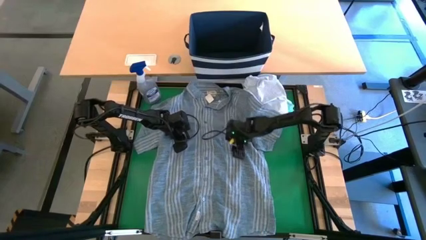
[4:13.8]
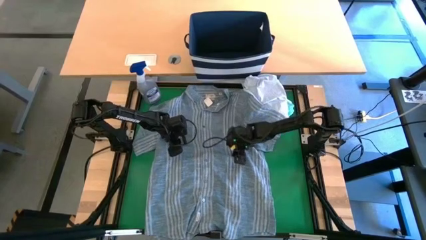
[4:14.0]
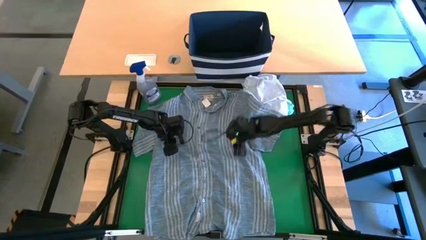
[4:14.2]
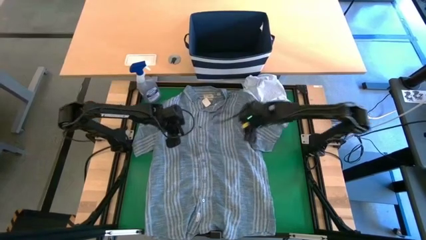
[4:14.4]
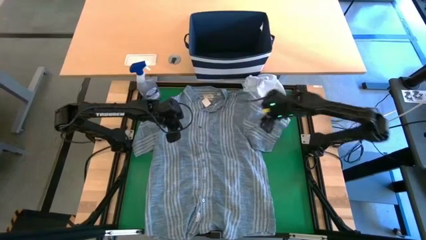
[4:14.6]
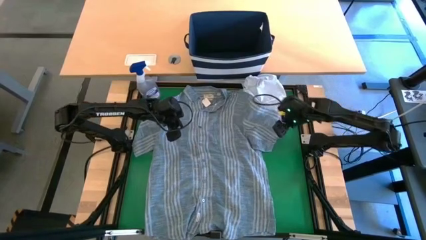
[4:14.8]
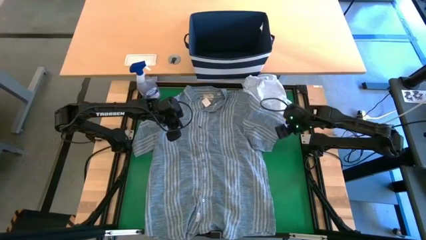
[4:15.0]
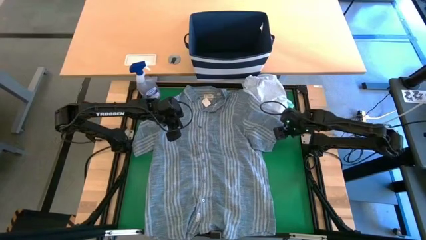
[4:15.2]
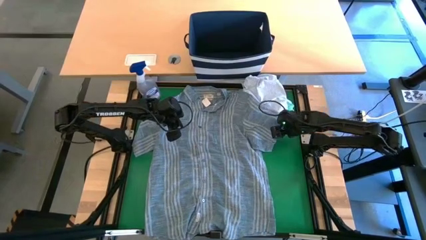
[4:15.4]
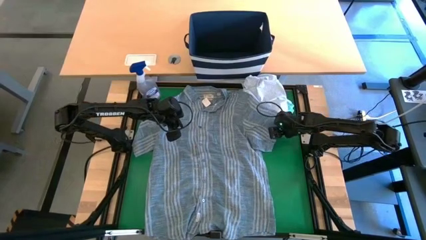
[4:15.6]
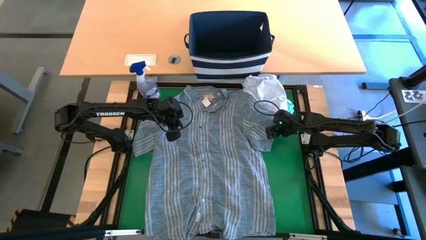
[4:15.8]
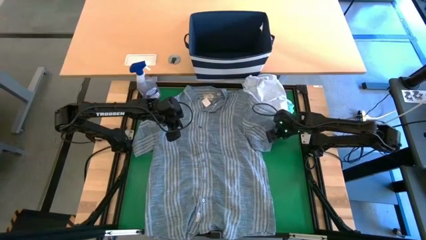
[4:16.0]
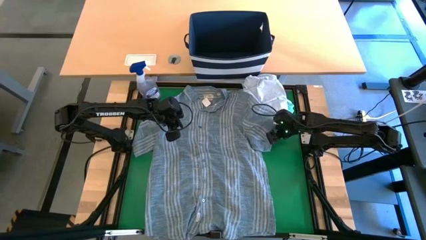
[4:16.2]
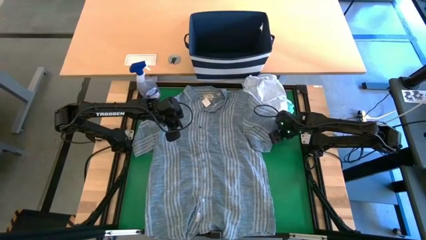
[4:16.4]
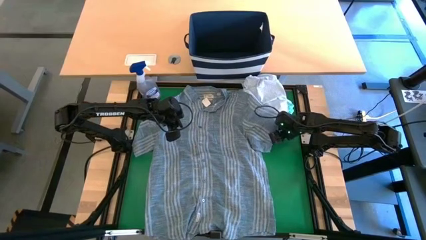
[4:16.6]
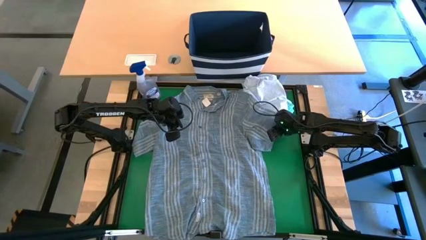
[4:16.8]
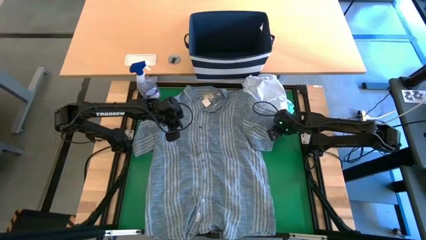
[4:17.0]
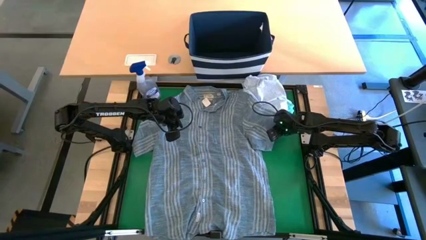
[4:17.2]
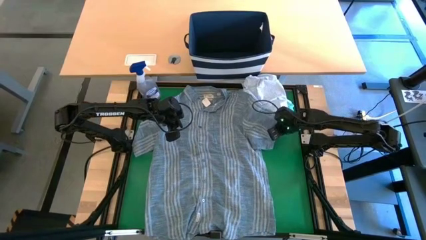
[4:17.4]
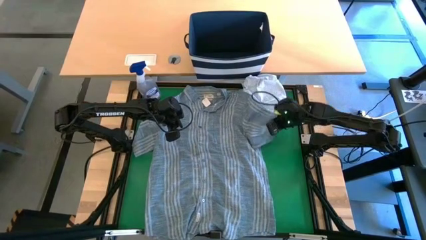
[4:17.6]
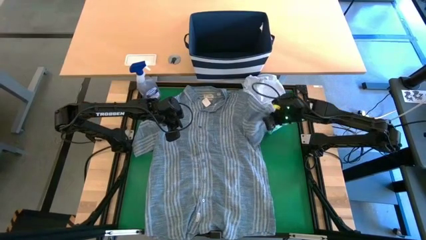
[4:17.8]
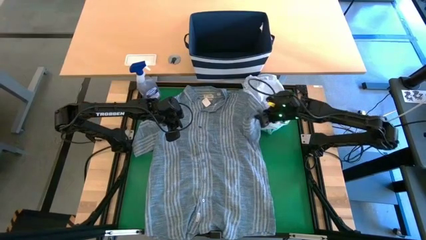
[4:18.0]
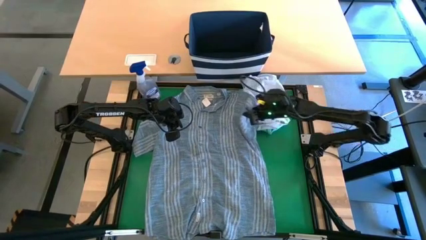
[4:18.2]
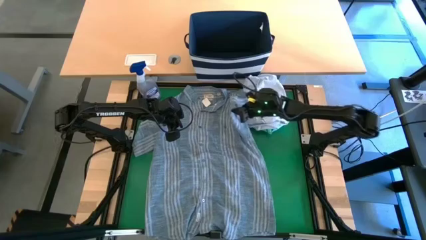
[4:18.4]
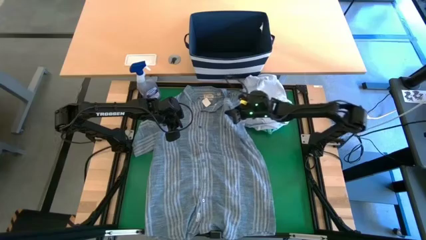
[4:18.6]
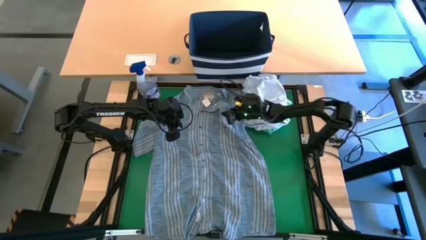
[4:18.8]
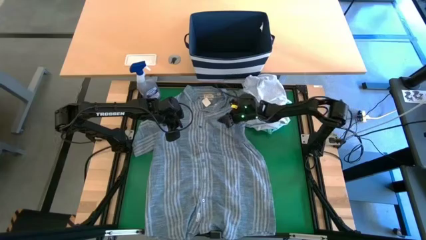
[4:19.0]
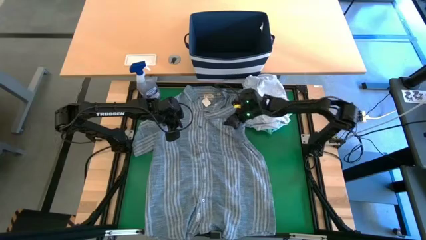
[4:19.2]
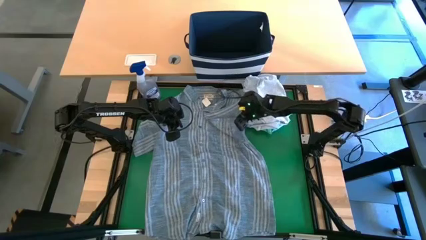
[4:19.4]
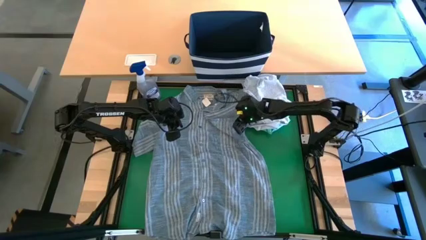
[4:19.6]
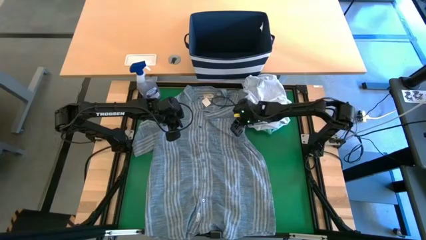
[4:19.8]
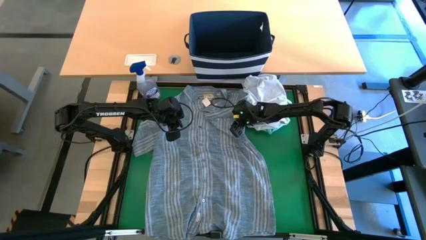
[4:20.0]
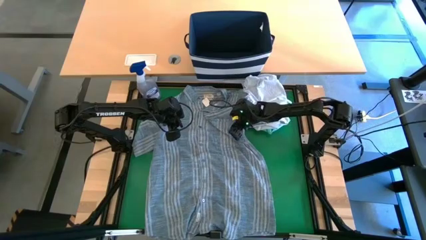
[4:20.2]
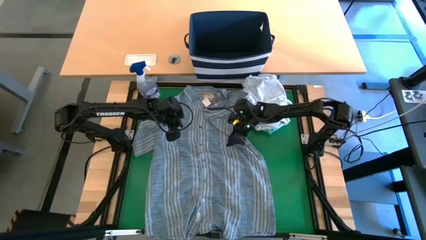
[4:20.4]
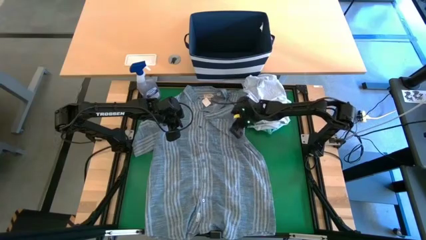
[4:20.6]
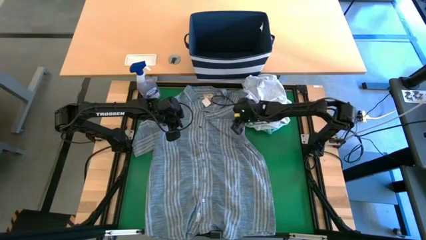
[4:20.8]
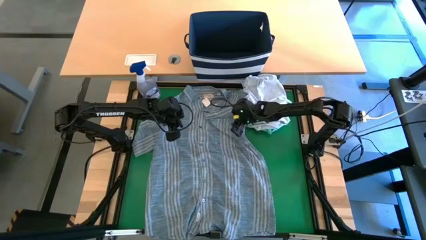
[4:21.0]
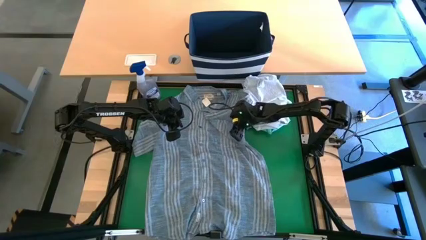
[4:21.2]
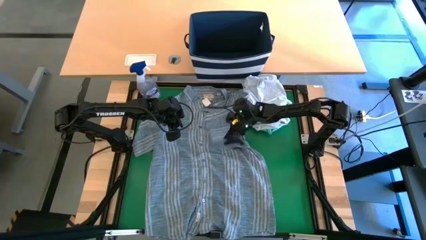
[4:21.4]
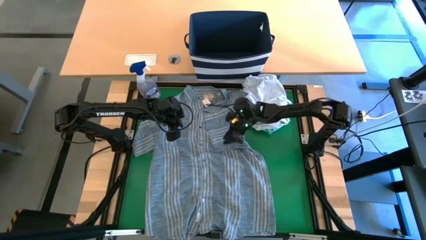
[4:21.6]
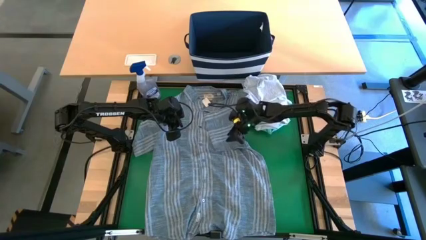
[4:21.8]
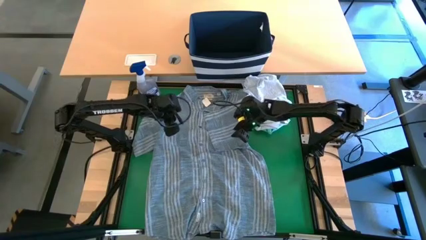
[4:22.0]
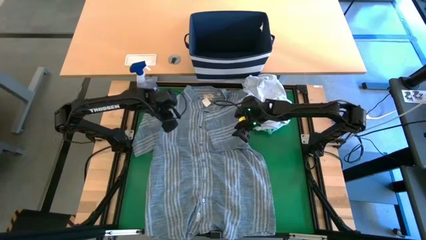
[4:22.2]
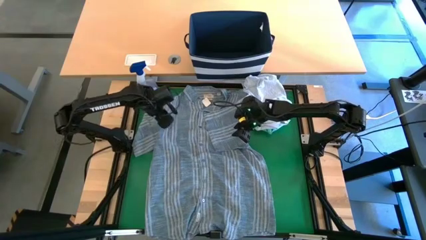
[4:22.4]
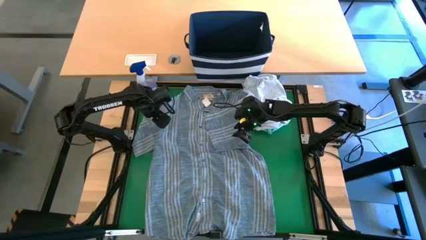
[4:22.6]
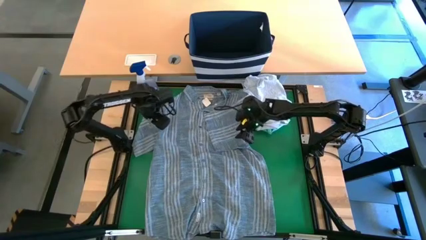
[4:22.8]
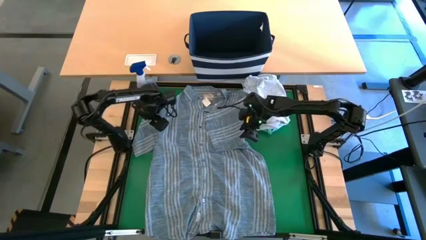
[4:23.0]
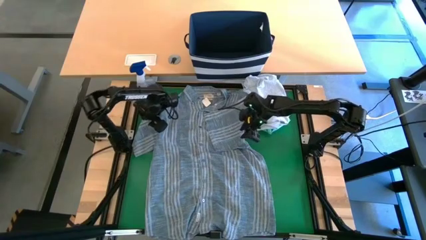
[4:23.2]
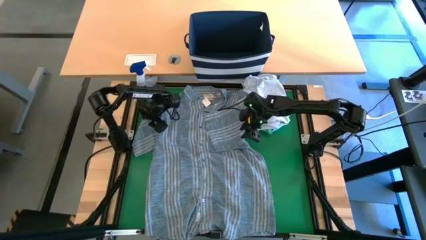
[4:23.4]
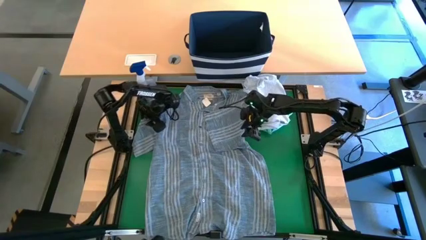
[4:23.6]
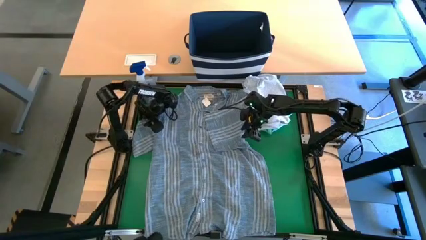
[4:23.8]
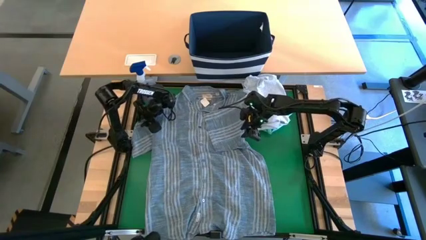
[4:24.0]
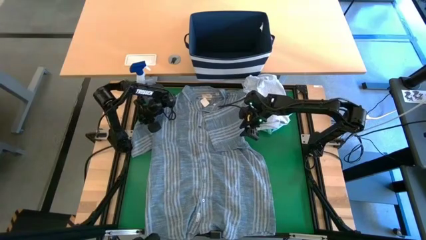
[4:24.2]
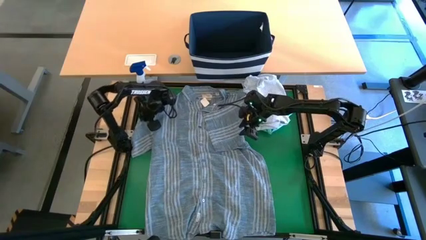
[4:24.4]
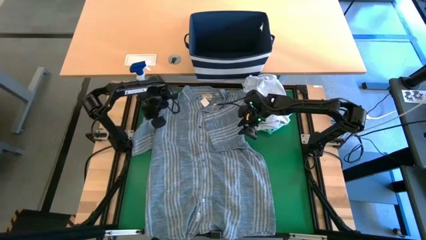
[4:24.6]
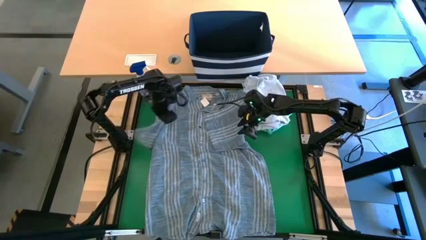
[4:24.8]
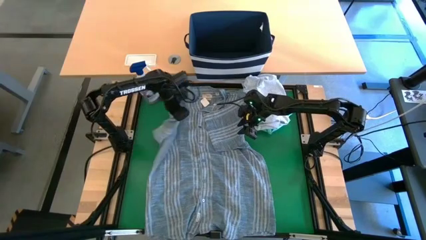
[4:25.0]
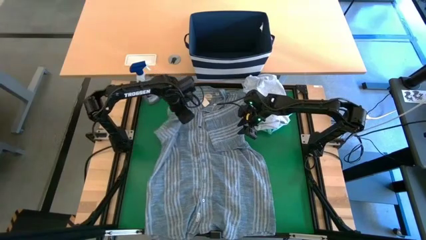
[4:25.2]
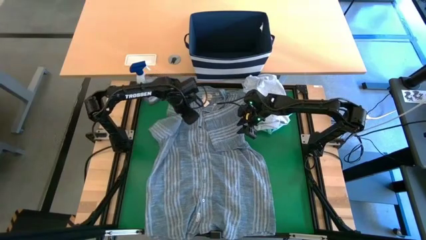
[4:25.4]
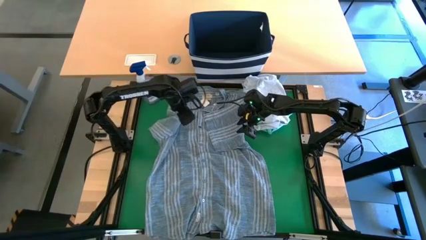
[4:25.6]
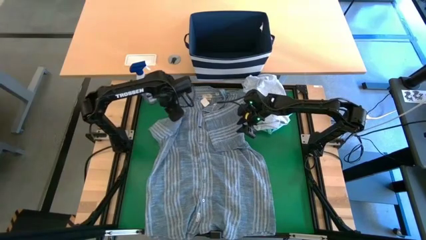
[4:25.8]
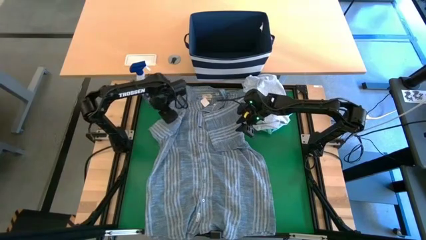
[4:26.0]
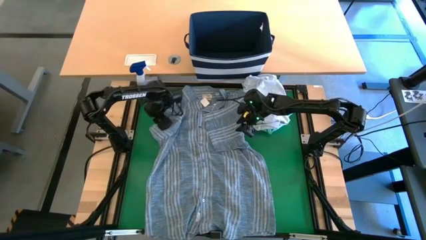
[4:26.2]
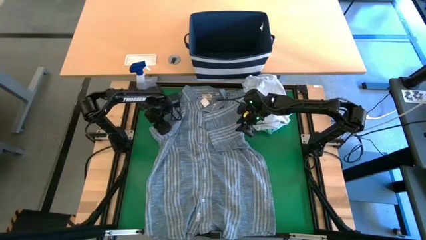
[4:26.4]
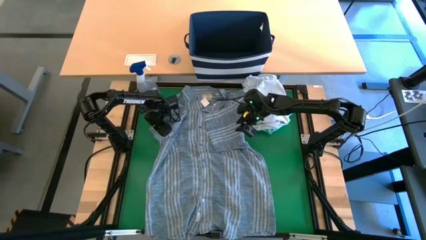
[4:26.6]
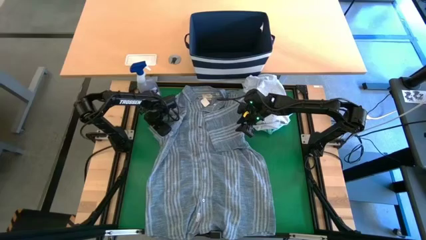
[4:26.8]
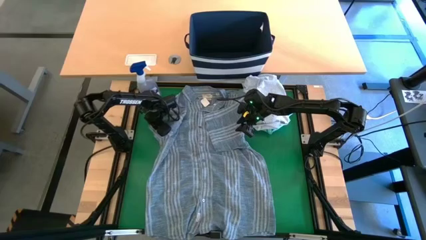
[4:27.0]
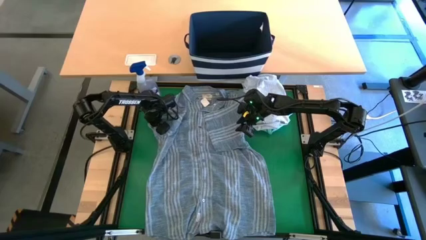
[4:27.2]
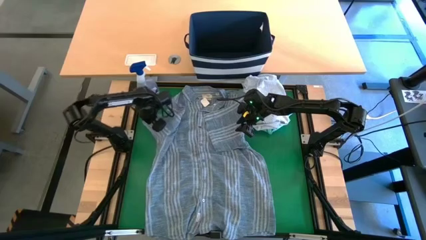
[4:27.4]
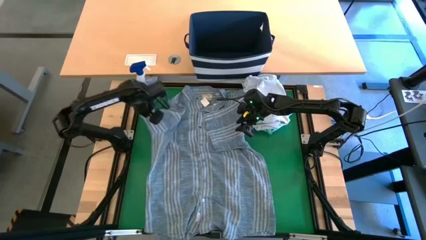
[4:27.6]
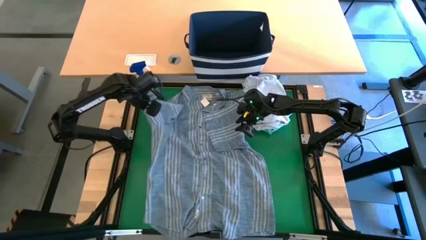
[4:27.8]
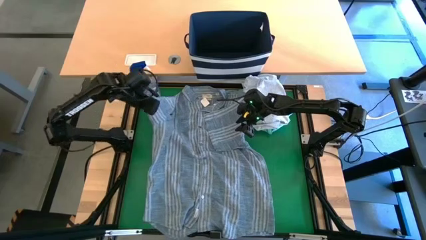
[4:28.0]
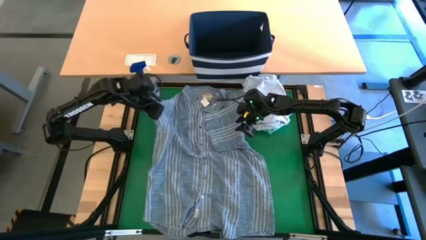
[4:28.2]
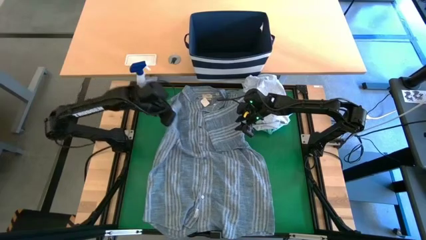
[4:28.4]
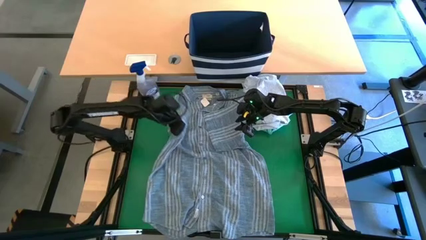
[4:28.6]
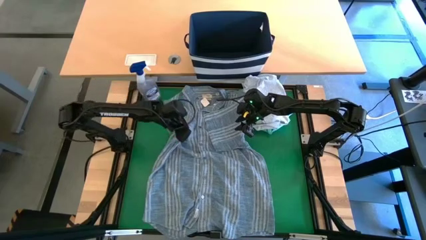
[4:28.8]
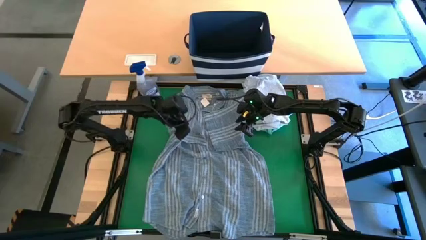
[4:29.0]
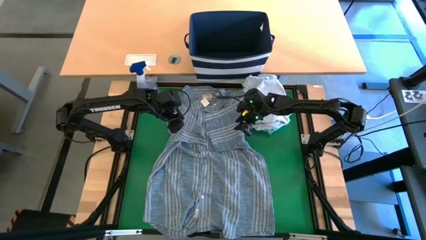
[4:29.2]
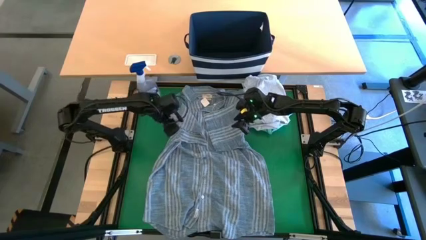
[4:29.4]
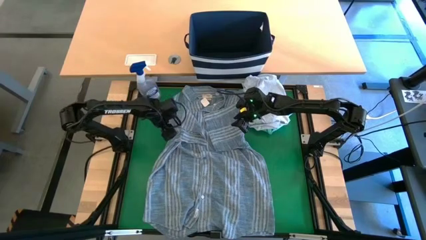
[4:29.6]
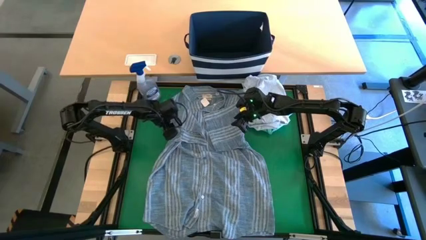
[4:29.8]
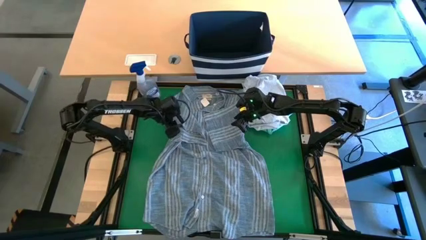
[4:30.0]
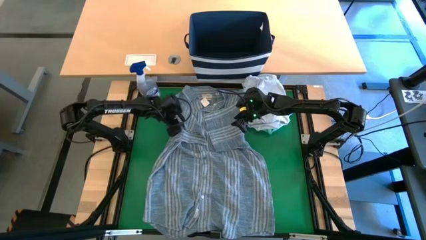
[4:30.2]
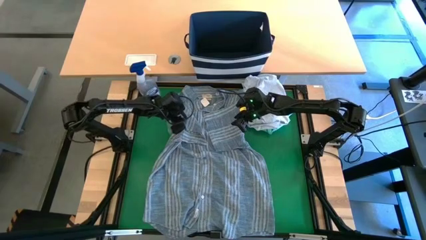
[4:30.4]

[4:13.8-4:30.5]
Task: Fold laundry
Fold the blue polo shirt

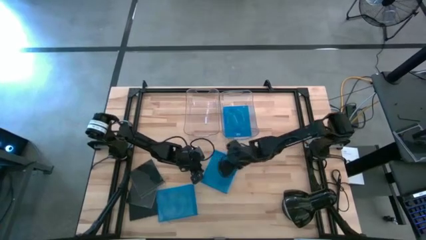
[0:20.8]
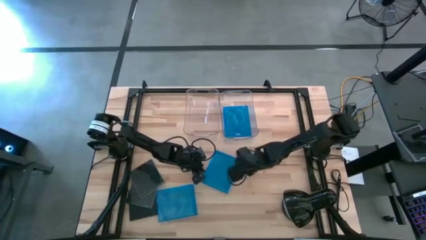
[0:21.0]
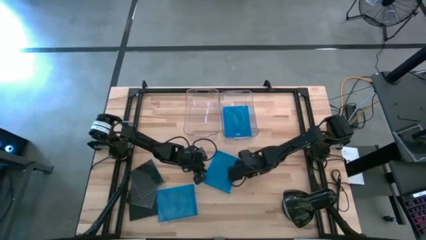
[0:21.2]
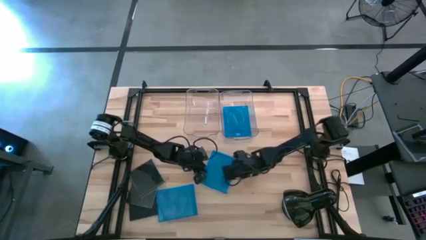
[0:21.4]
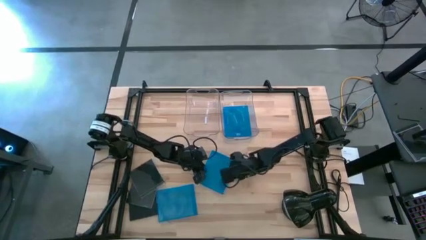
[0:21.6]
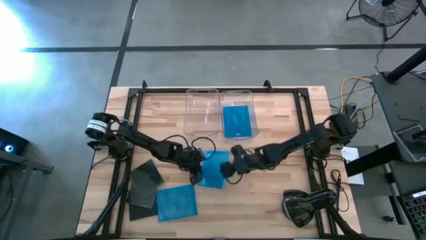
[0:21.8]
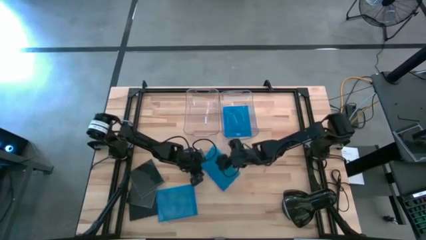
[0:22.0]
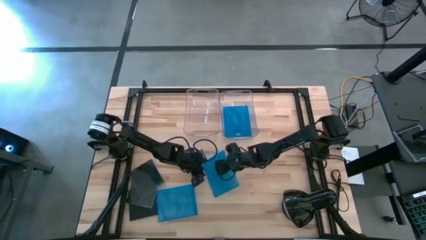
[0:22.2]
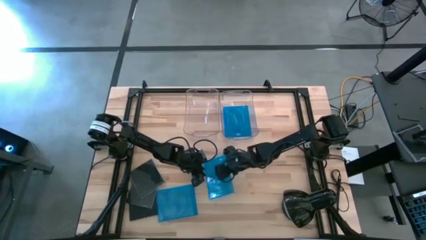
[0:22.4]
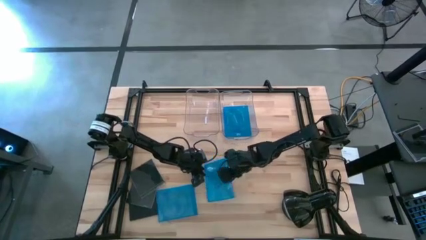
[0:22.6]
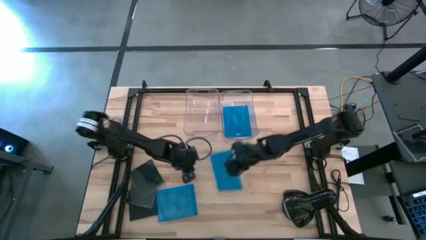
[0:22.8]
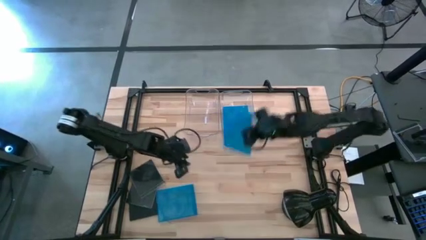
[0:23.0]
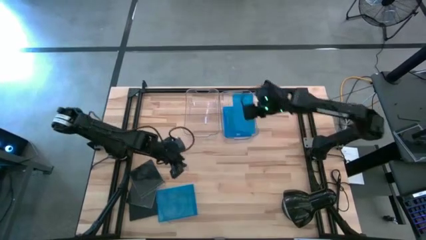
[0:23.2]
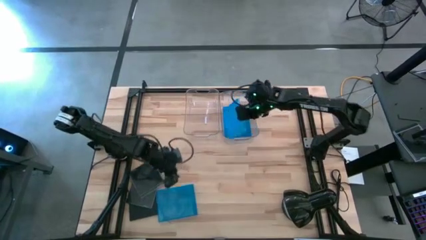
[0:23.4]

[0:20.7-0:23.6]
Task: Pick & place jewel cases by type
Put the right blue CD case into the right transparent bin
